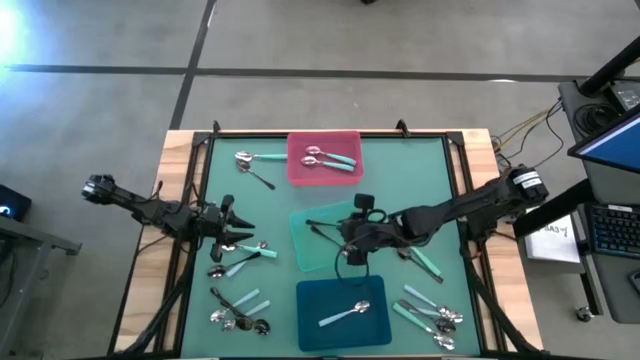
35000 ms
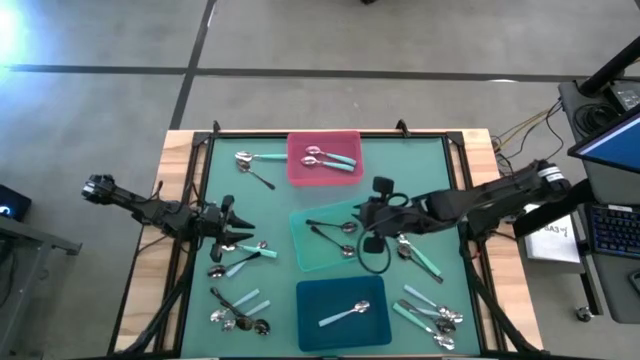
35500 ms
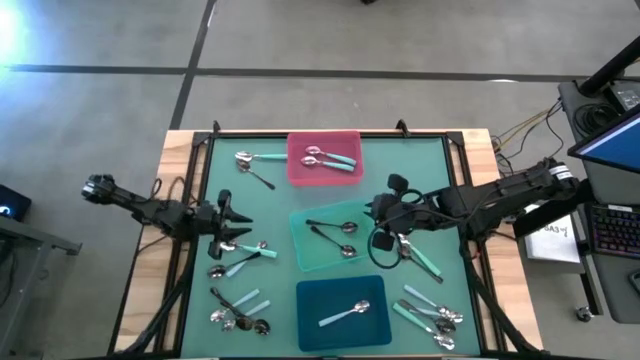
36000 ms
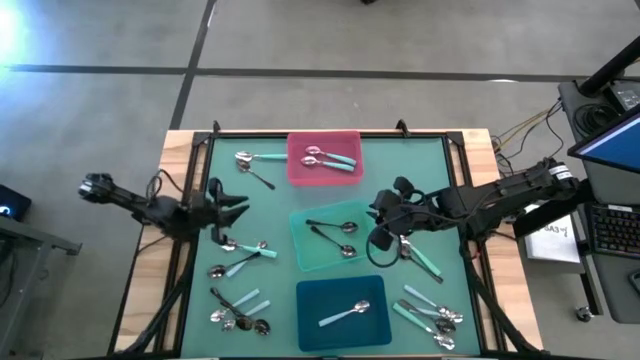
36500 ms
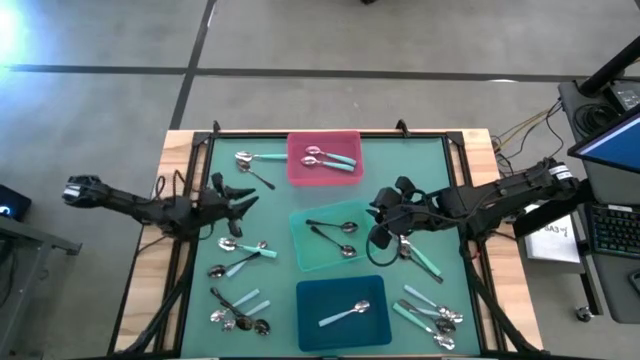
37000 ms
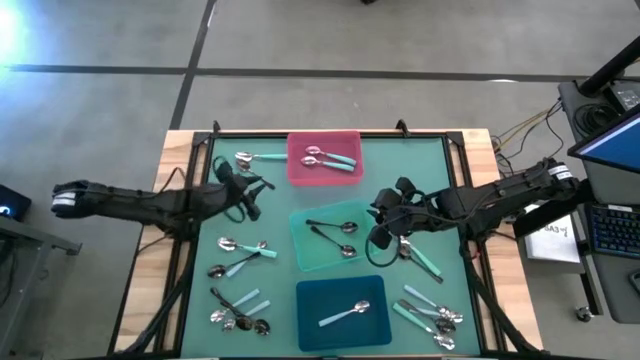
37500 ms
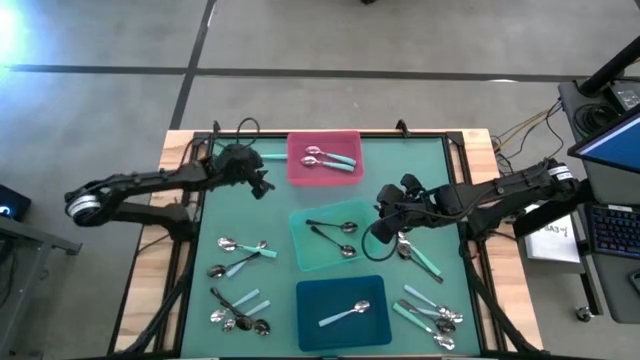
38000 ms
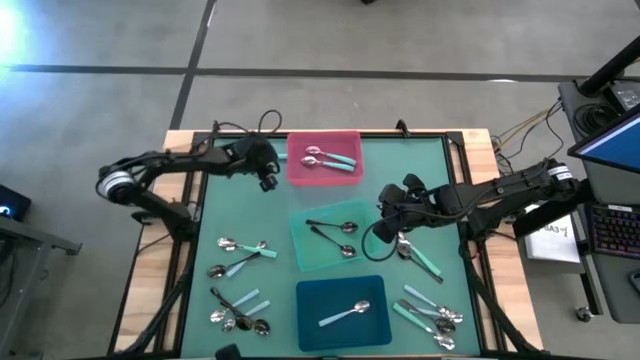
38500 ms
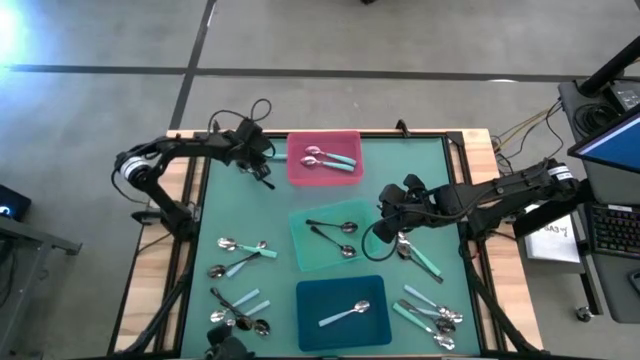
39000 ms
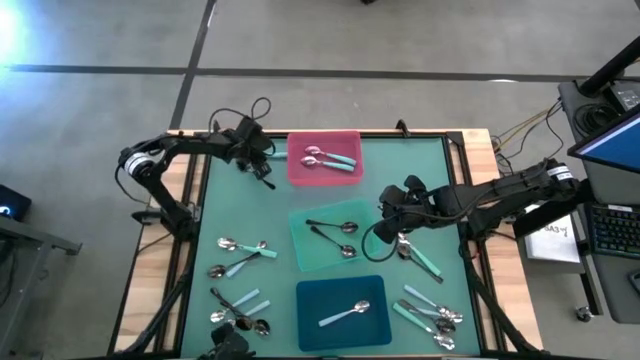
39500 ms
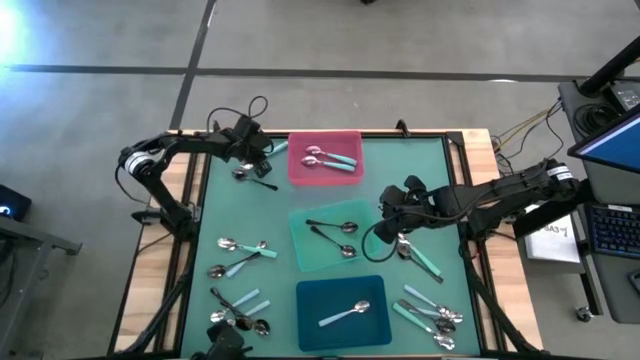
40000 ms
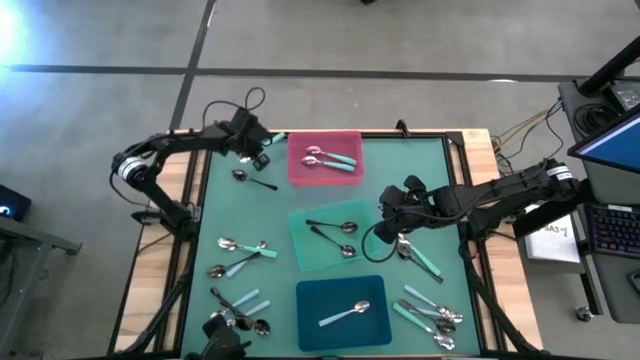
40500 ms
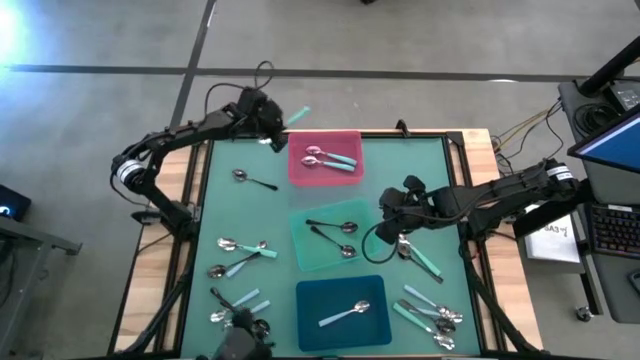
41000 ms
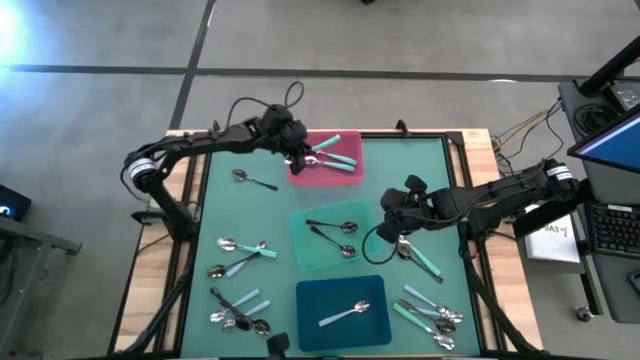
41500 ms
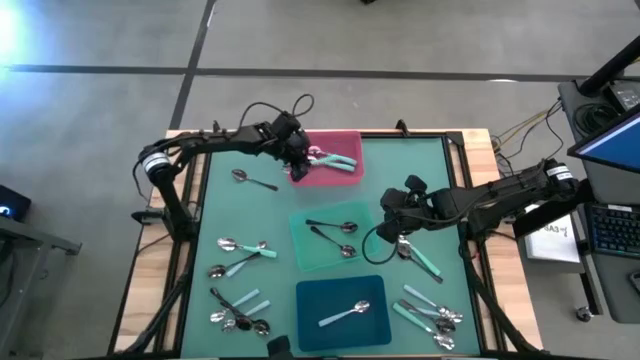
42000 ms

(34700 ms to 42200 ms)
Task: Sort silverware by color (type)
Put the green spoon into the pink bin

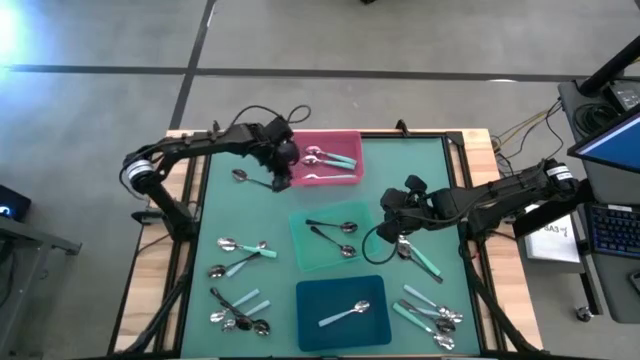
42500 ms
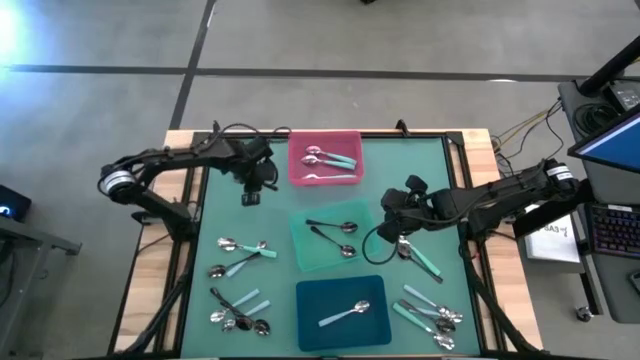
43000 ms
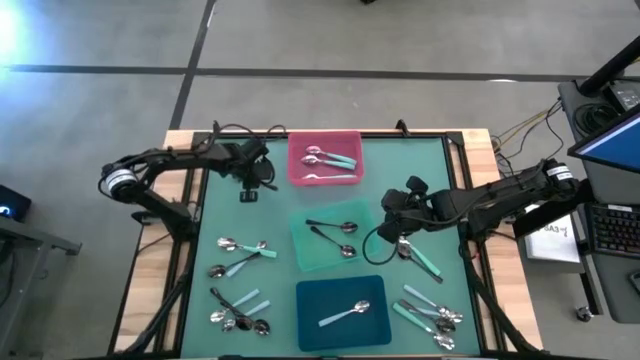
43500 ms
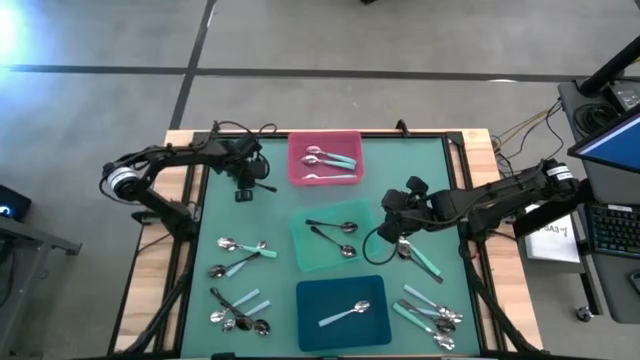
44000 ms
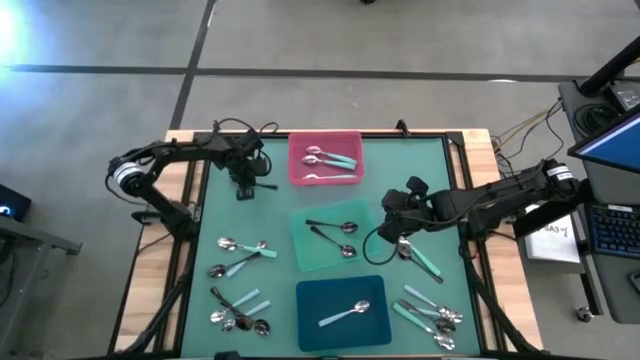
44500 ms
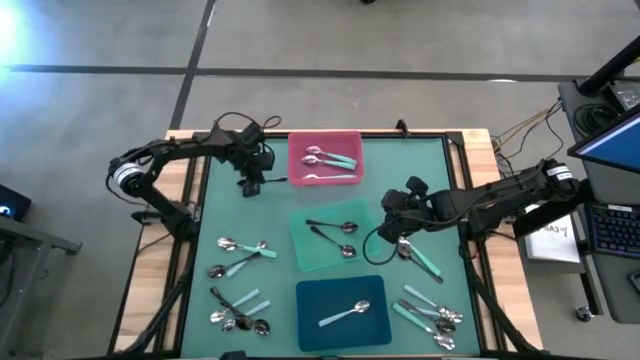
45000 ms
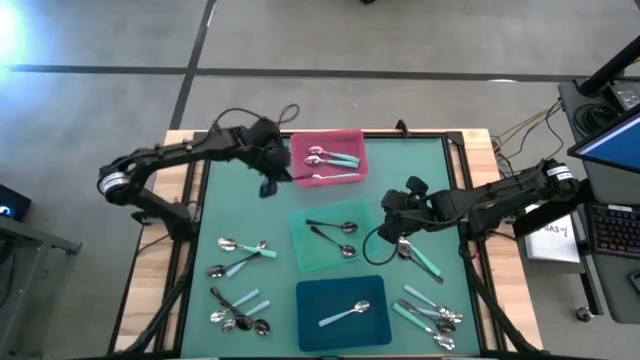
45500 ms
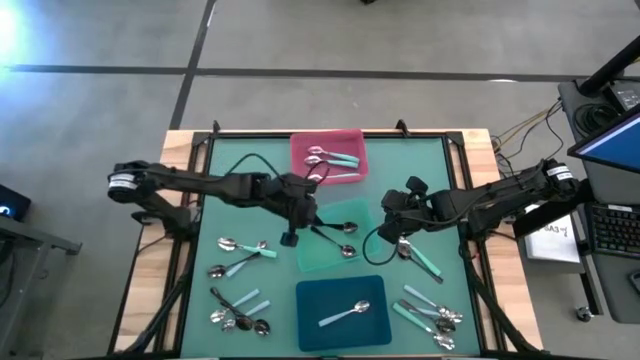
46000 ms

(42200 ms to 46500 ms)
Put the black spoon into the green bin

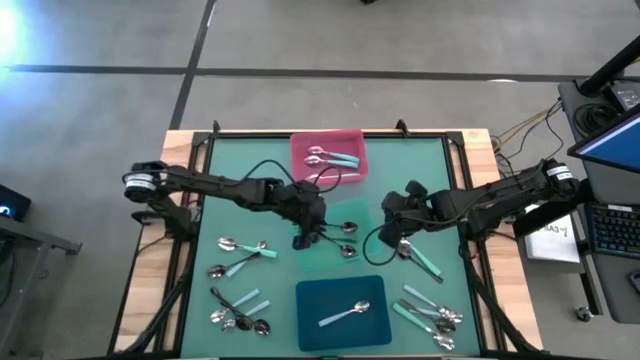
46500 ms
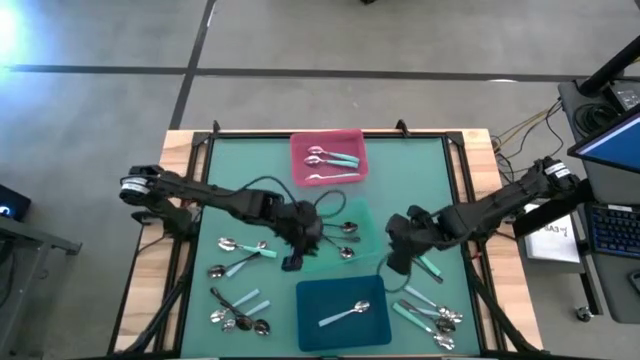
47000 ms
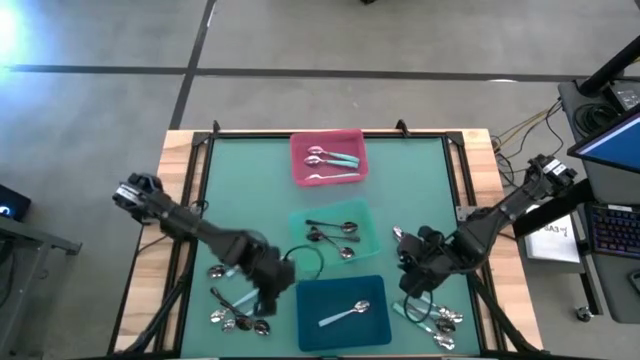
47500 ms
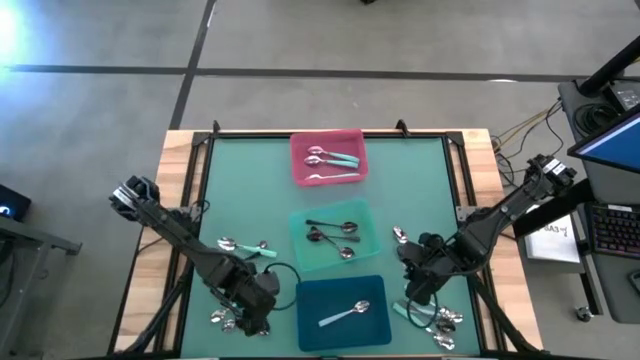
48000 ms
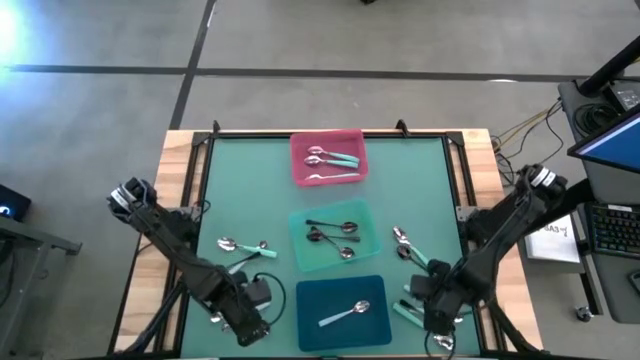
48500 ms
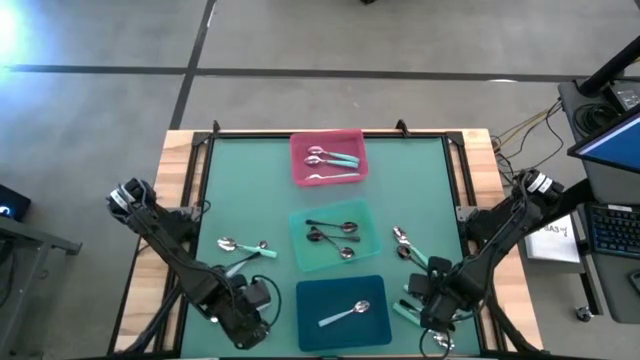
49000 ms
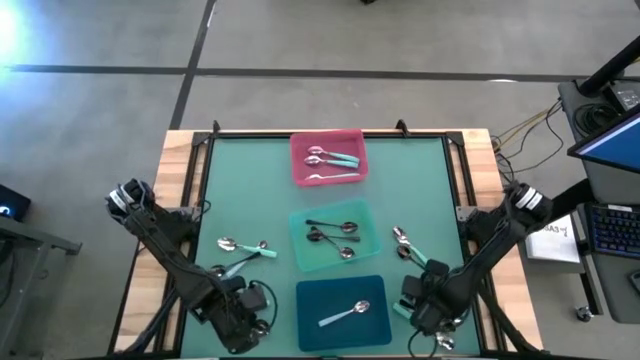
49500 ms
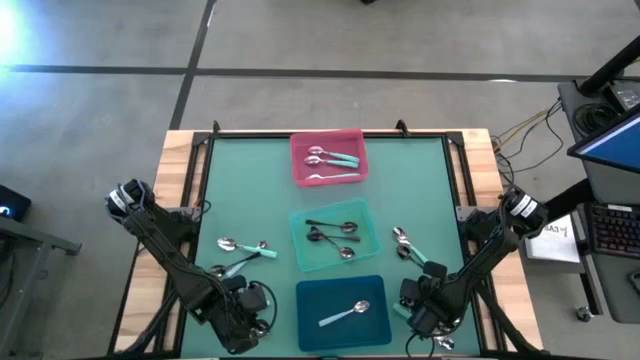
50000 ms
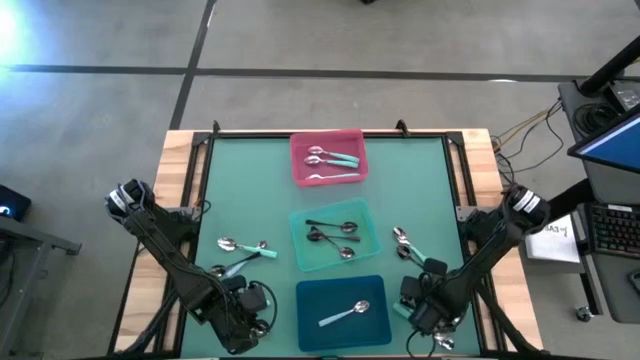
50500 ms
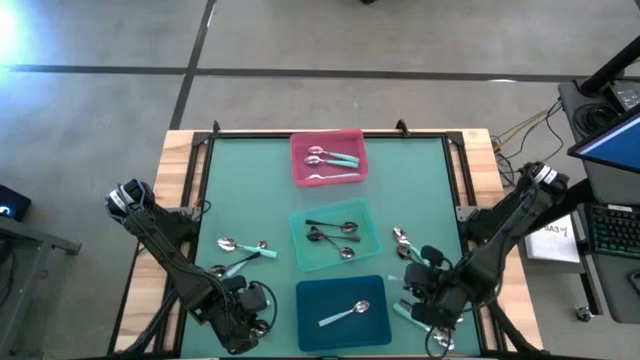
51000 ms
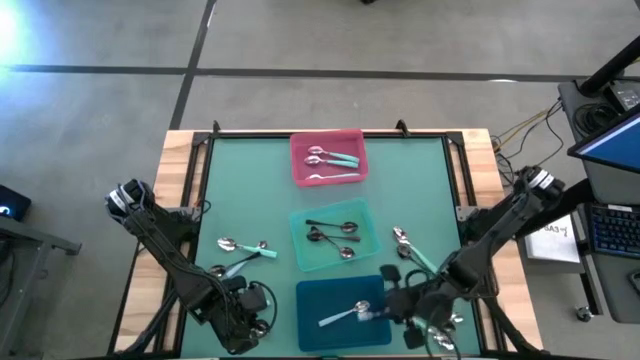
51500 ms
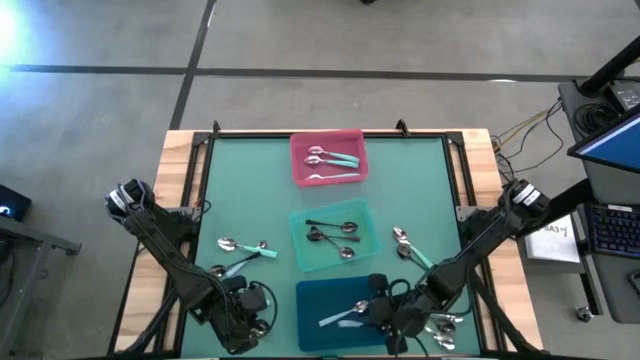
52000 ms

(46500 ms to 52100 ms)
Put the blue spoon into the blue bin

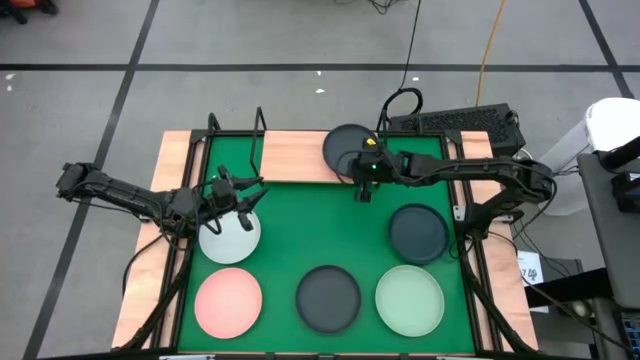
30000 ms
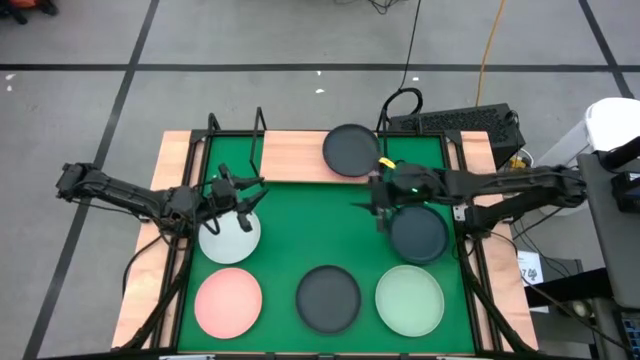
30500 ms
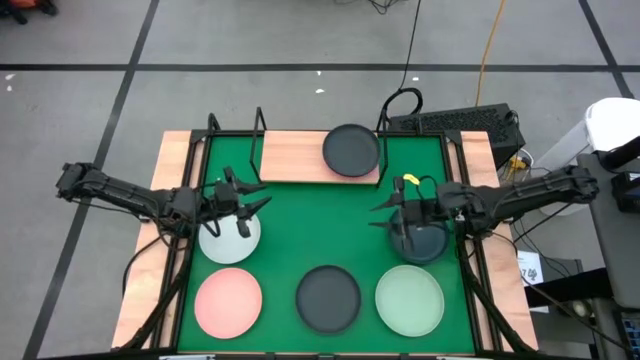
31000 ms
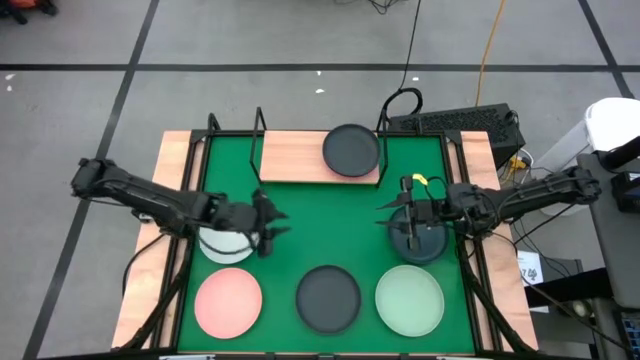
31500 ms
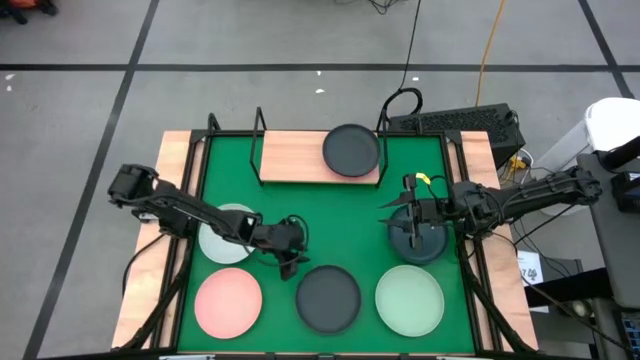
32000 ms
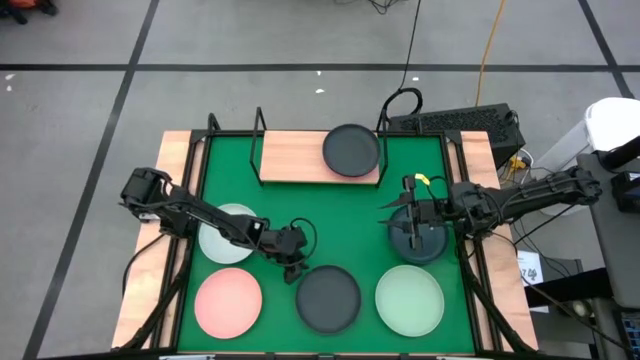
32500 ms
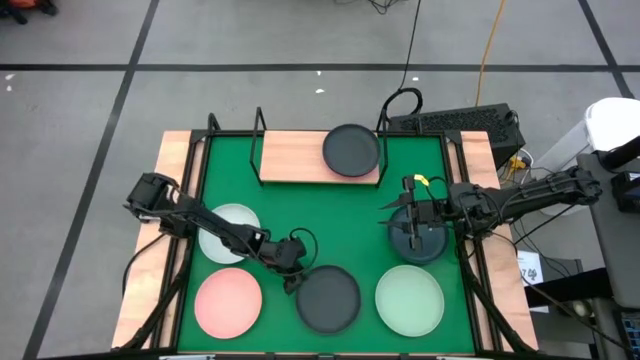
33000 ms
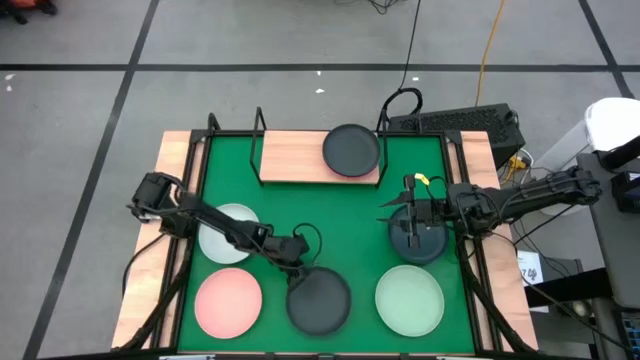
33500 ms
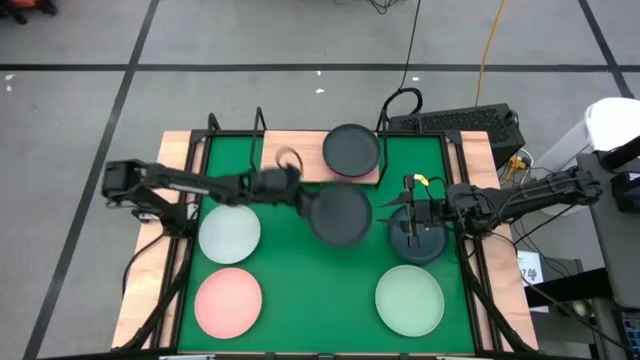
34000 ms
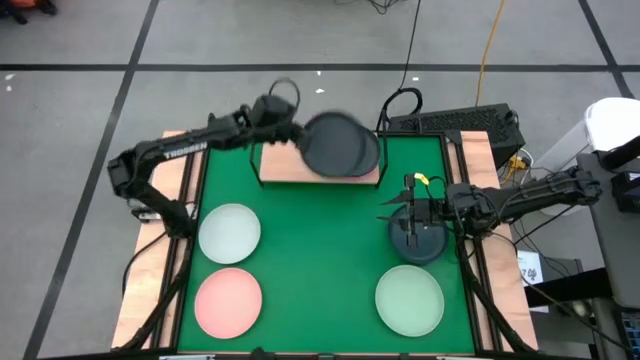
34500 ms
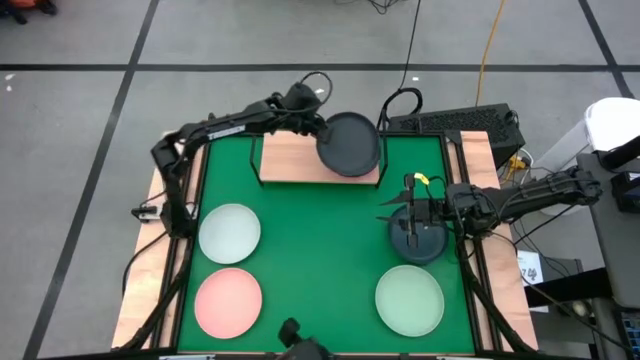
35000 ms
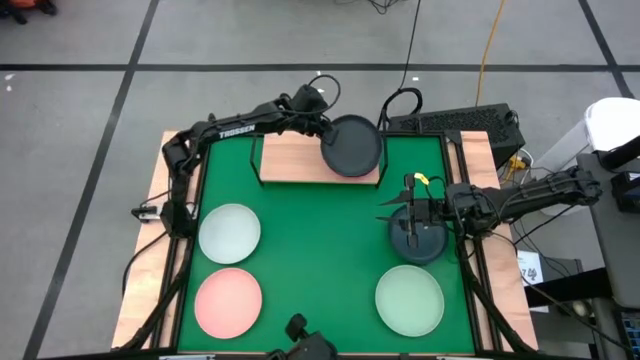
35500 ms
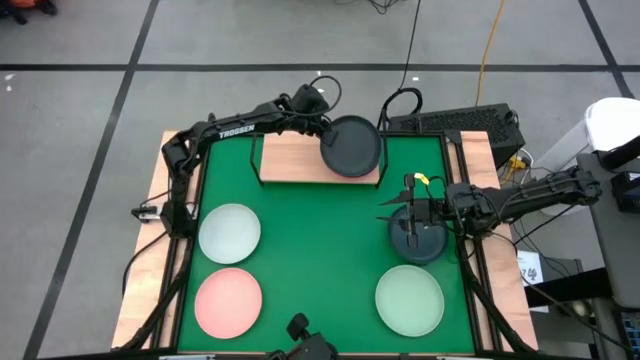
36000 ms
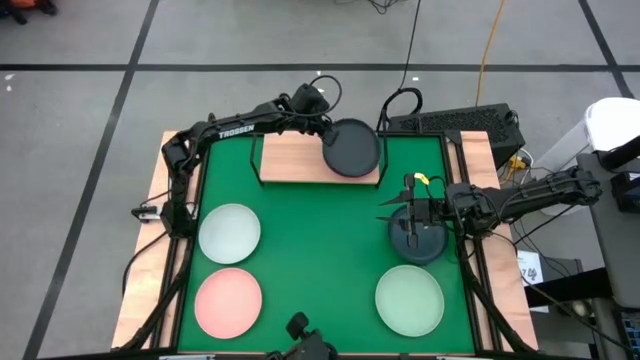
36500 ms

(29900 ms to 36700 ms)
Task: Place and stack plates onto a shelf
Stack the dark green plate on top of the other dark green plate on the shelf
